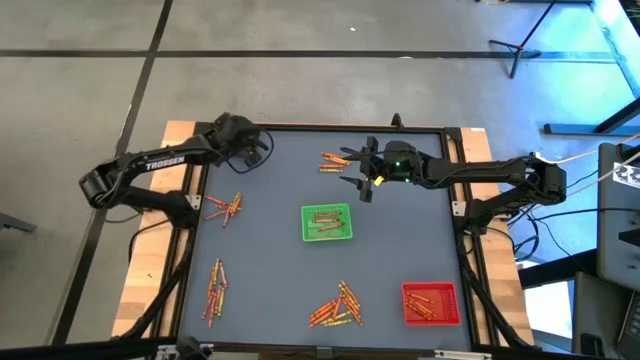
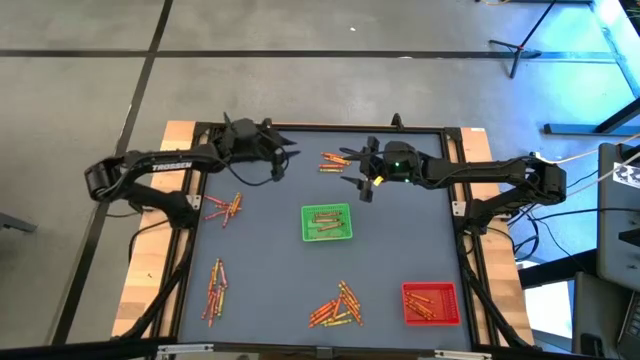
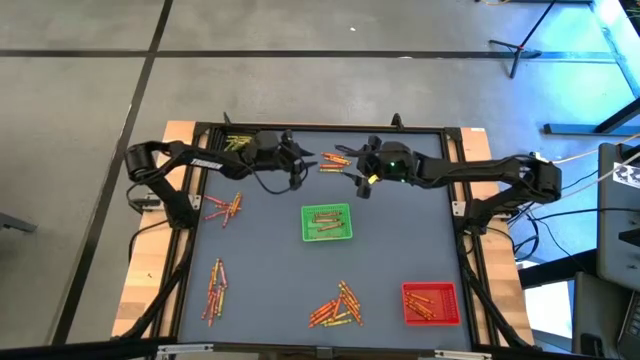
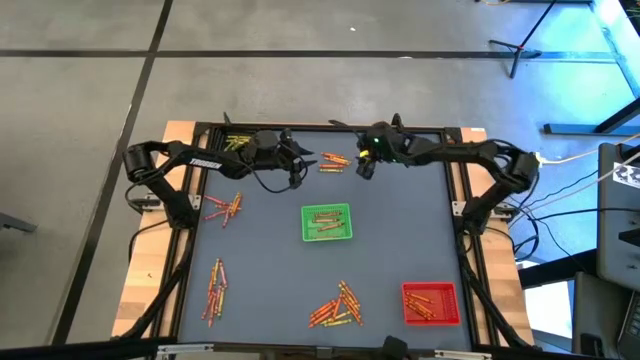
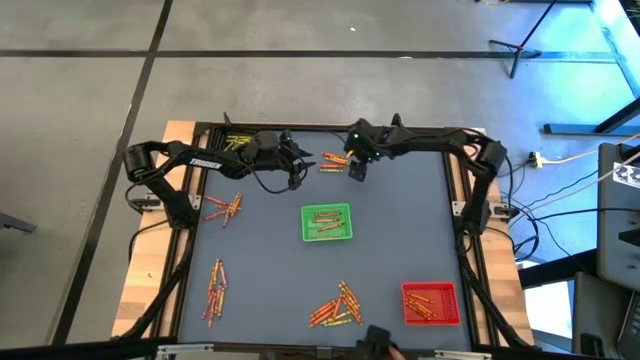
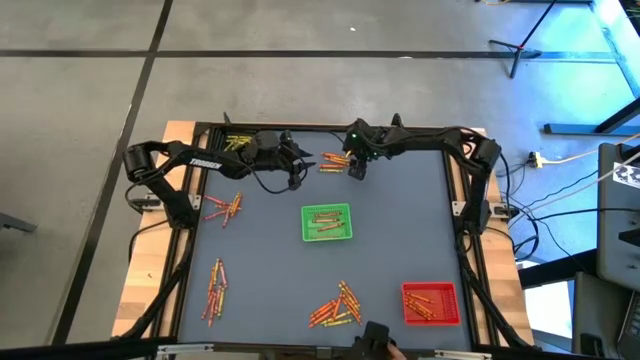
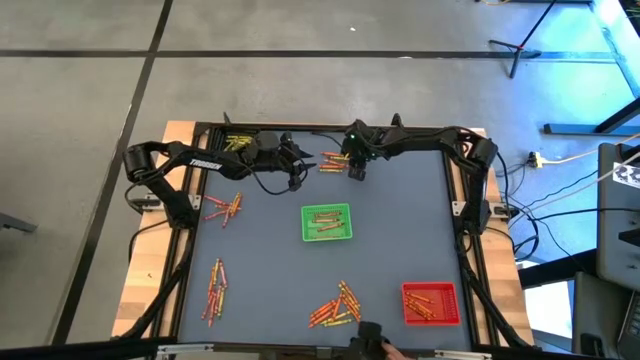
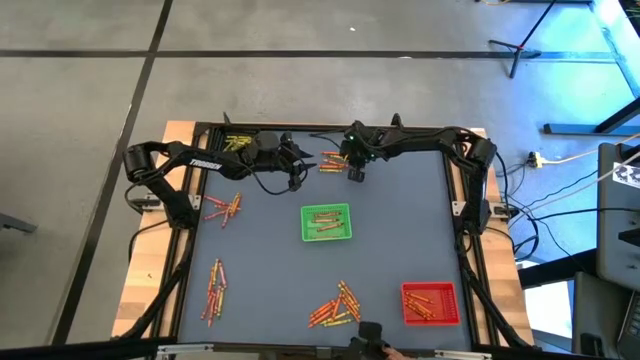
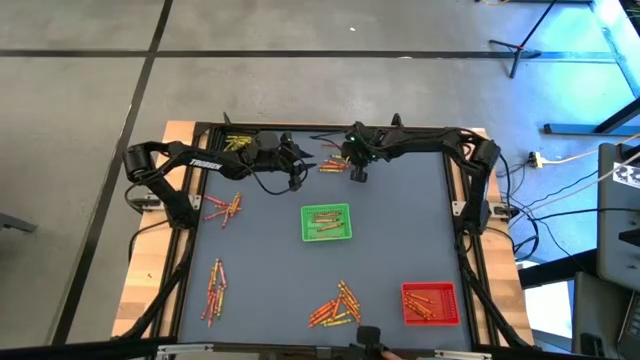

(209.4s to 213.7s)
Task: Sort crayons
Put the green crayon into the black bin

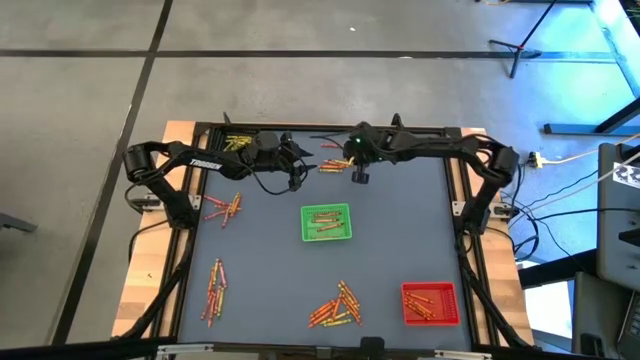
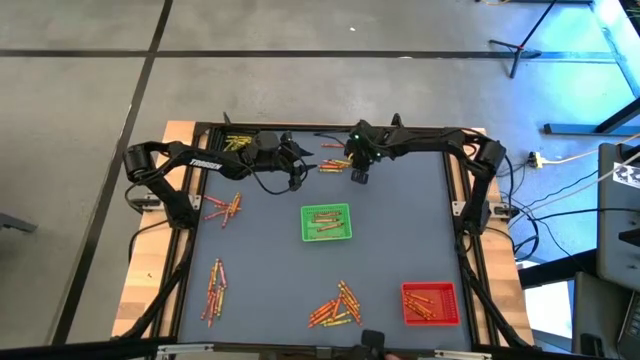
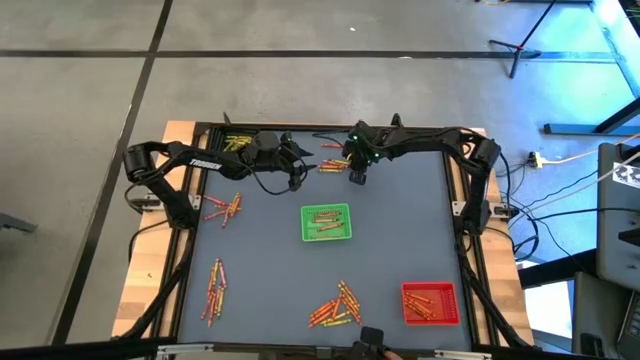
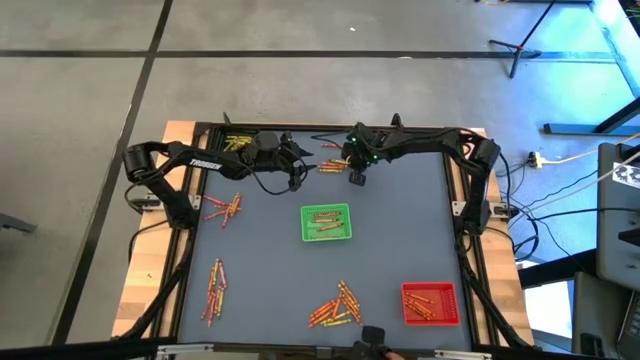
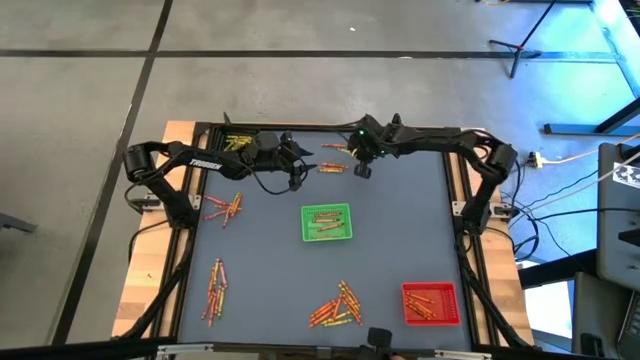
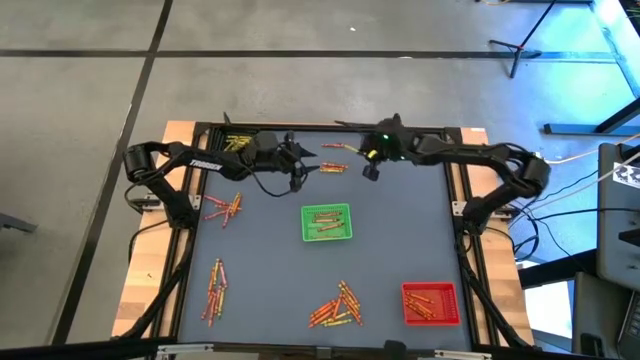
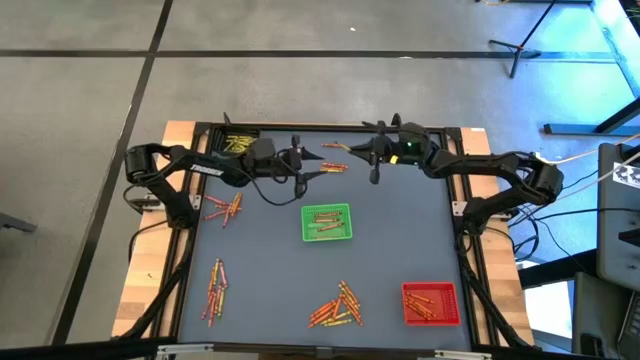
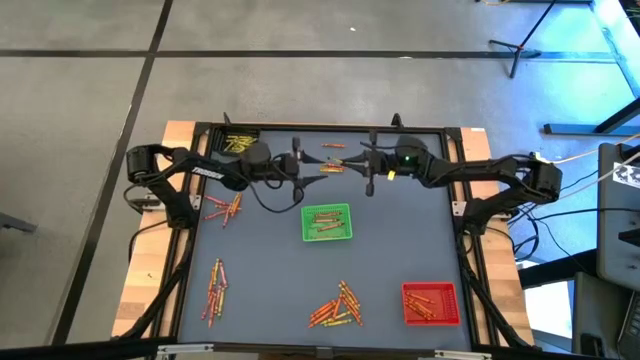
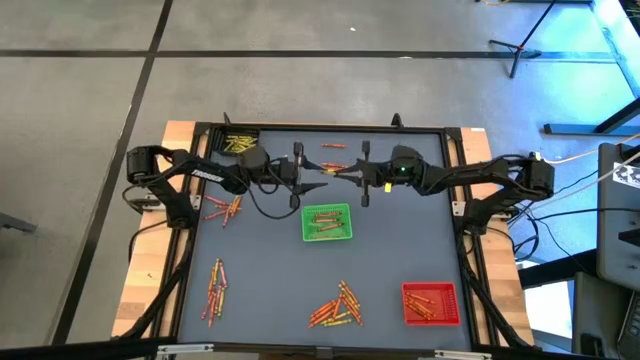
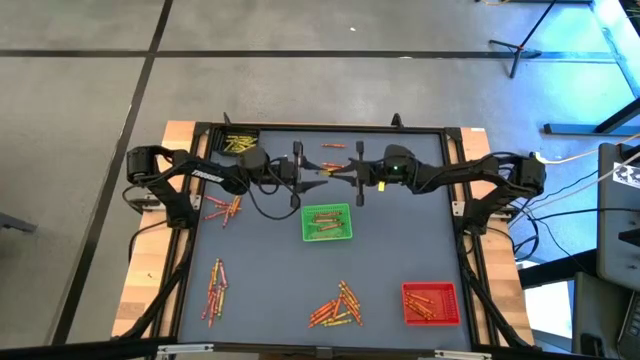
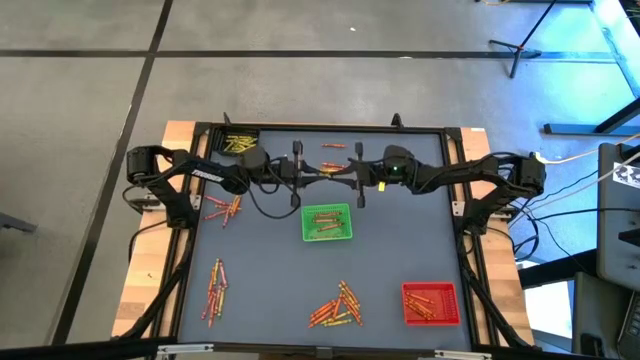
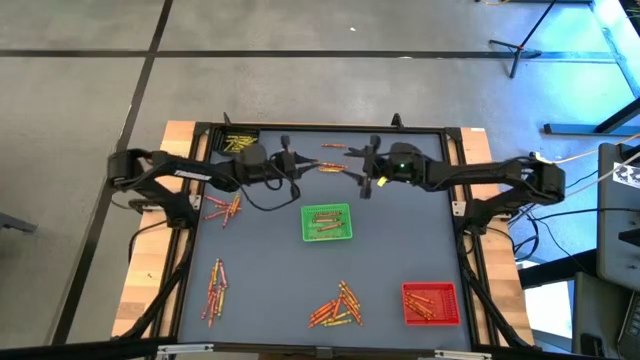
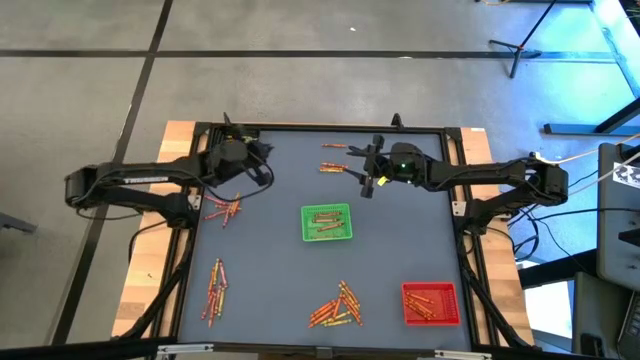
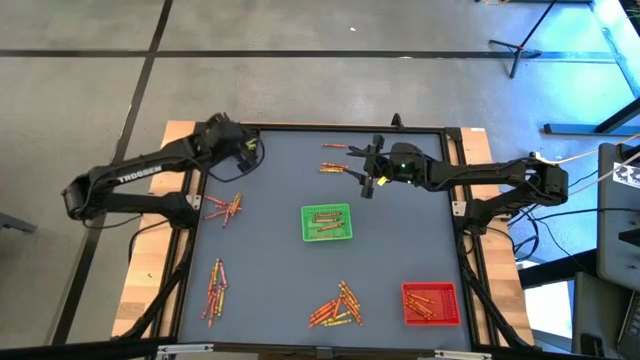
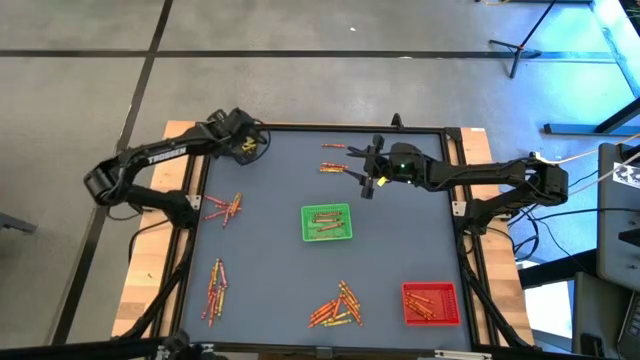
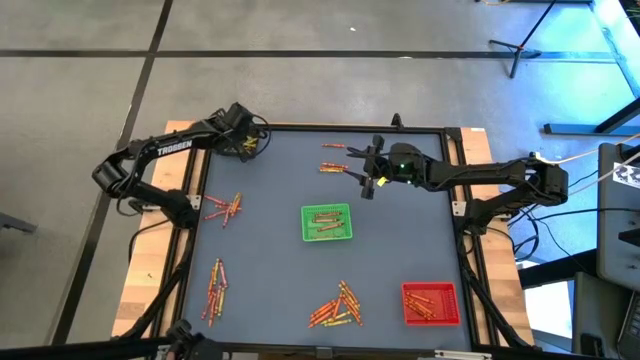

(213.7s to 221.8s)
Put the green crayon into the black bin

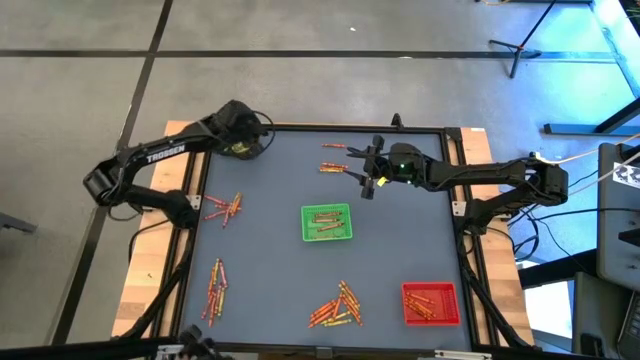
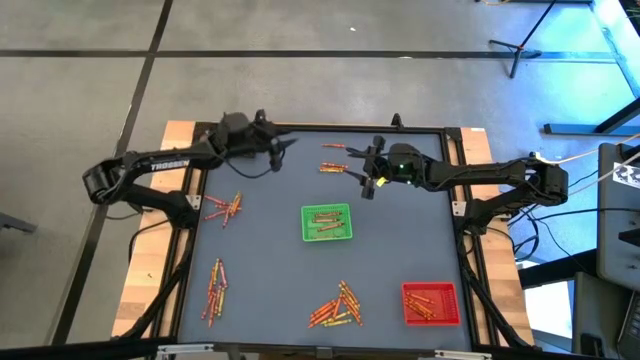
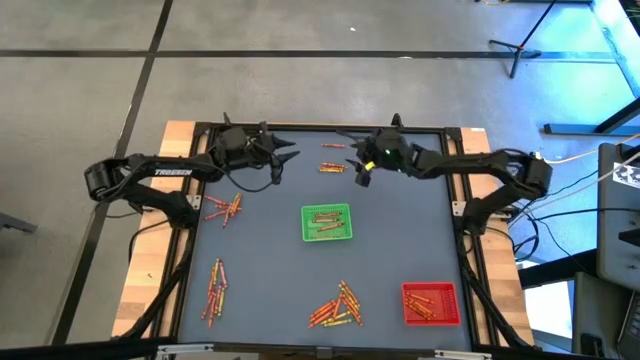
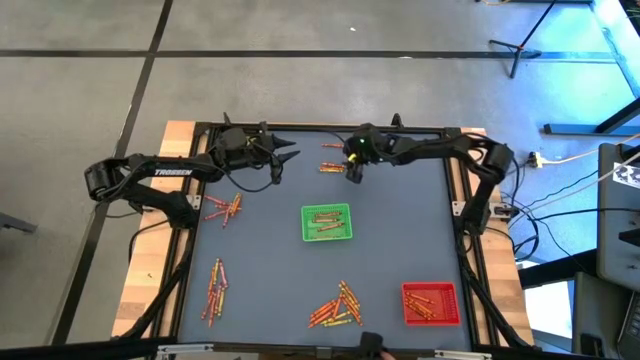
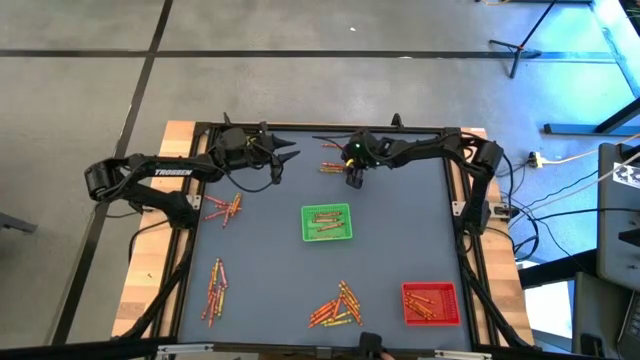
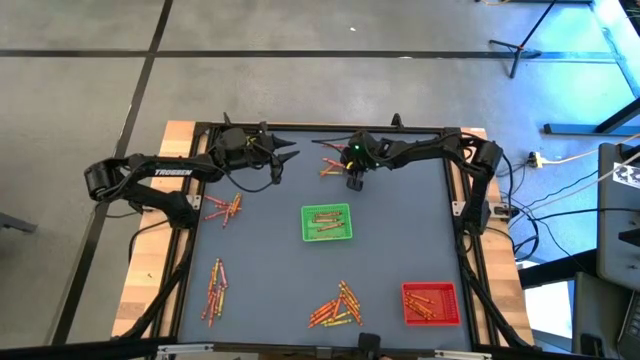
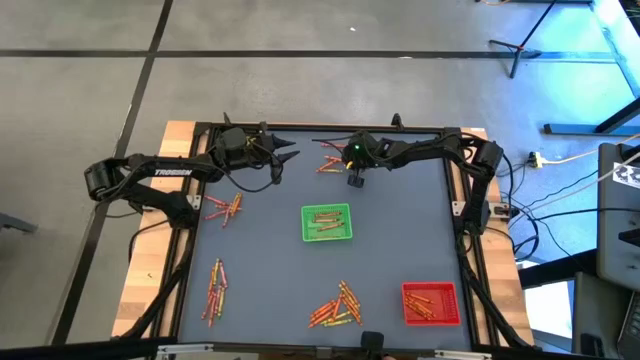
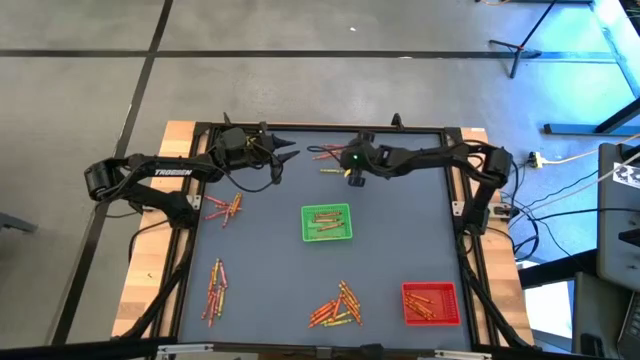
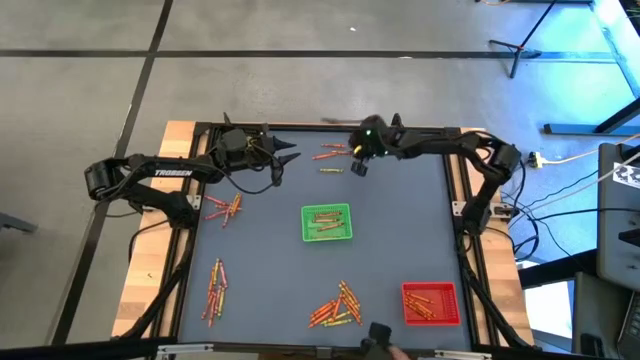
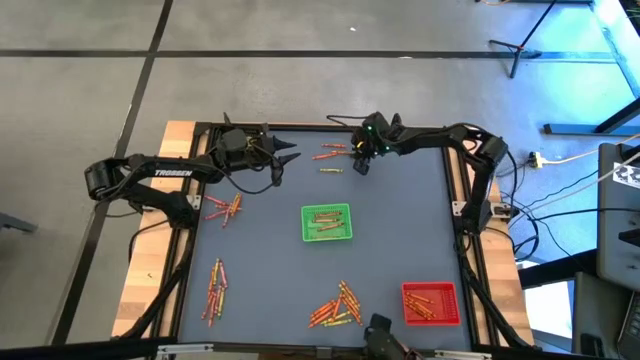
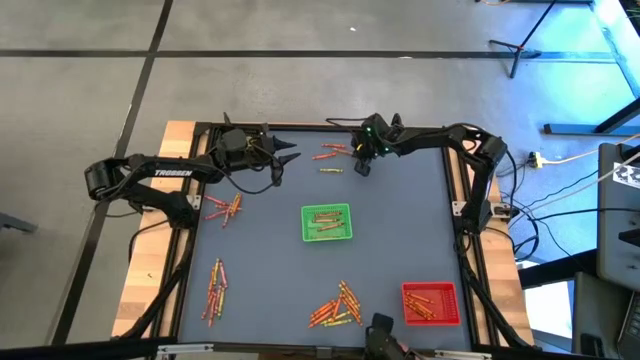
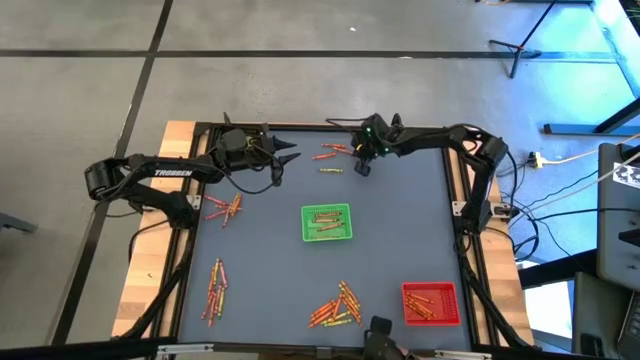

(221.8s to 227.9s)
Put the orange crayon into the red bin

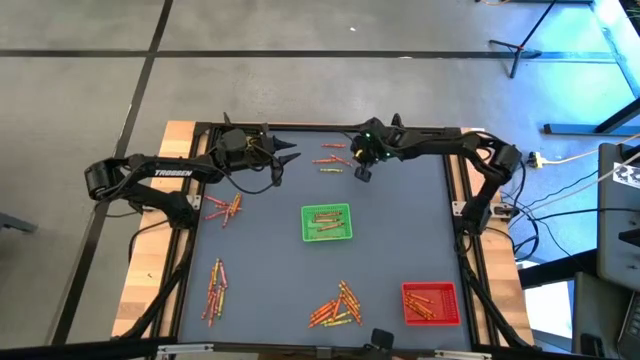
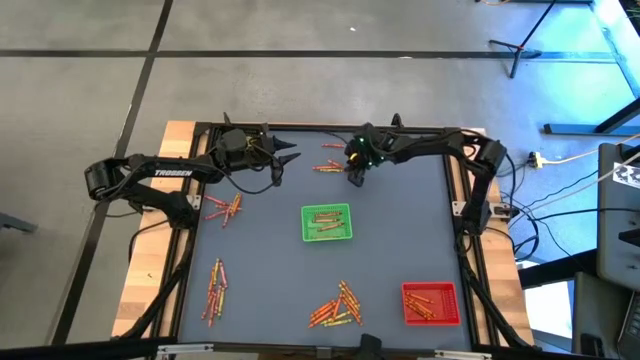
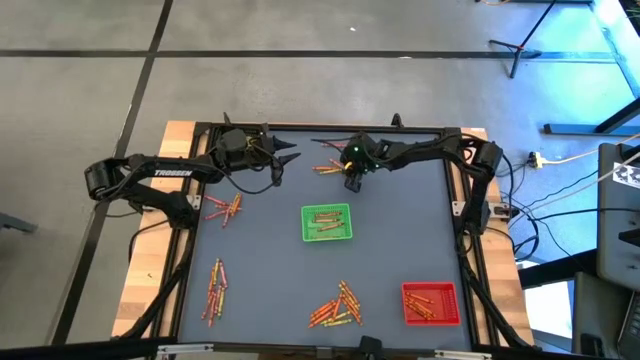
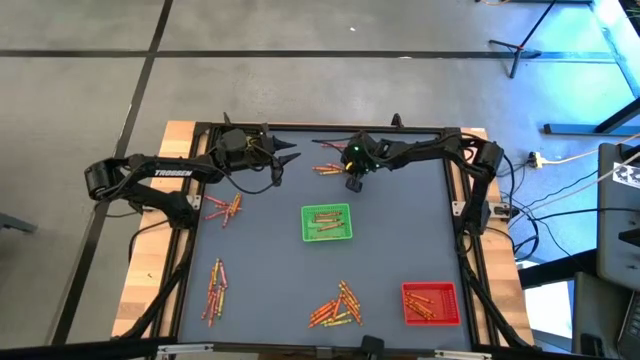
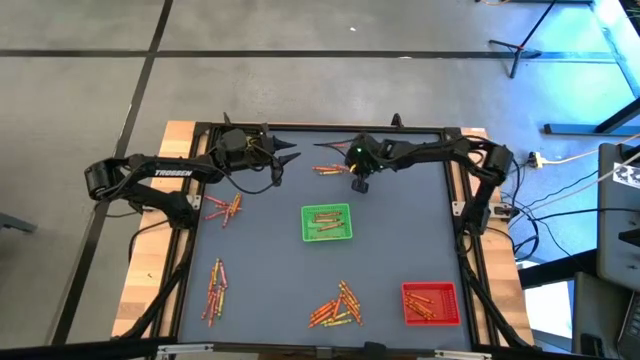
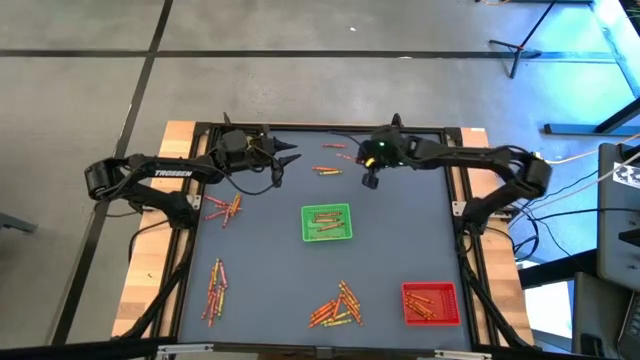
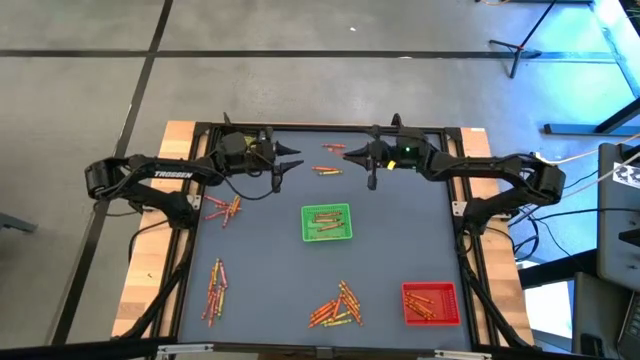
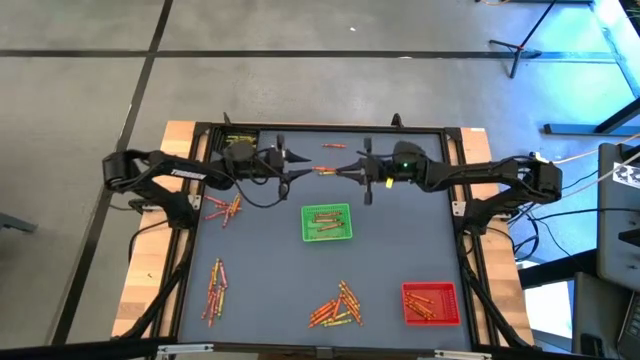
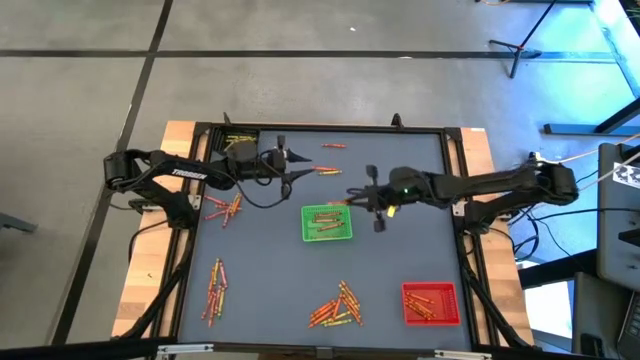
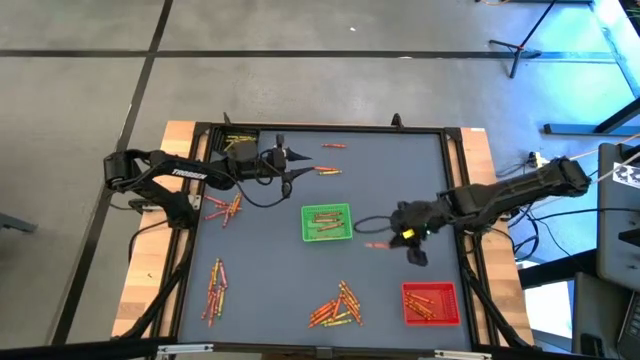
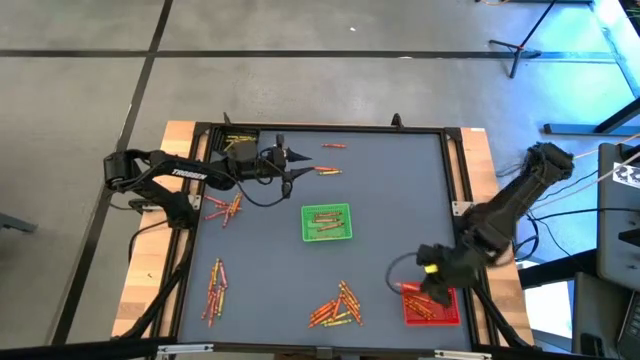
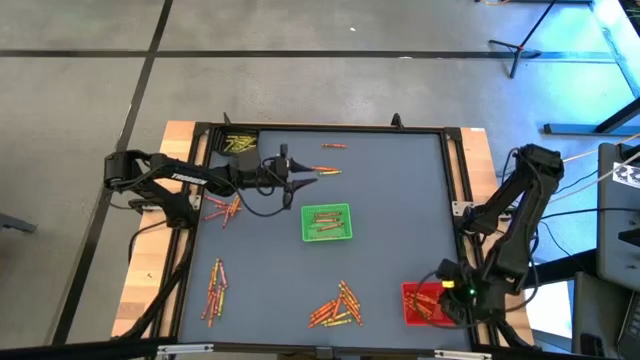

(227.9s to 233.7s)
Put the orange crayon into the red bin
